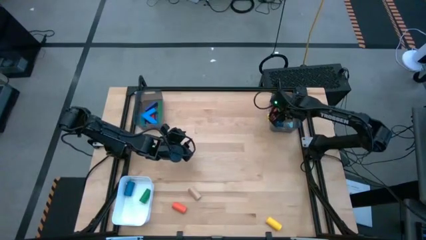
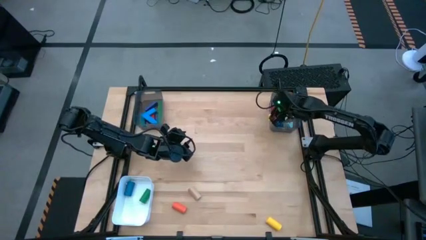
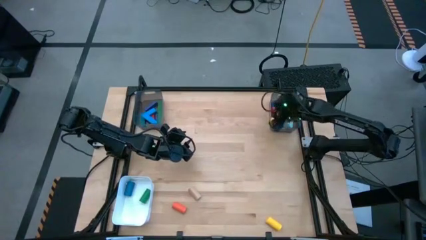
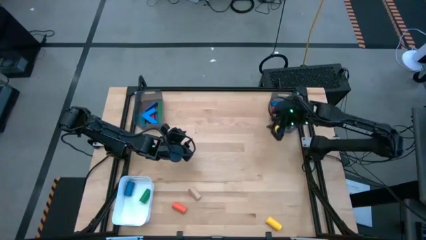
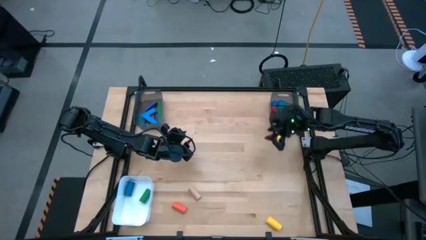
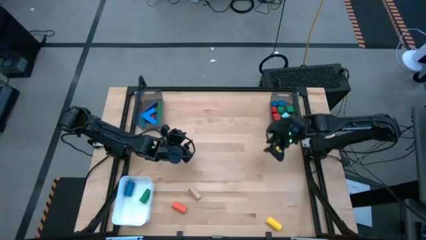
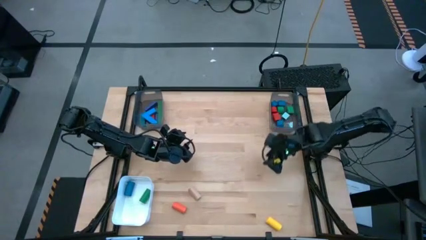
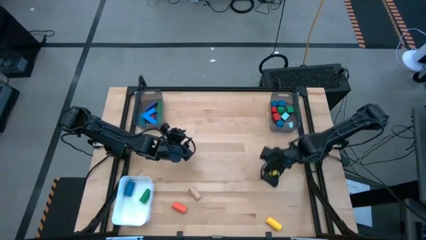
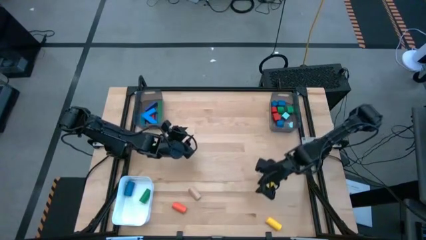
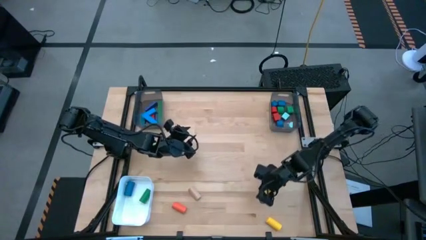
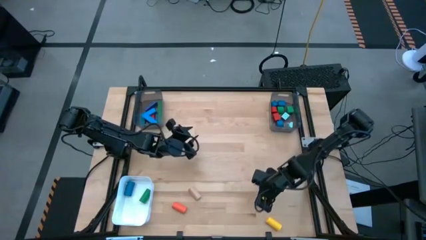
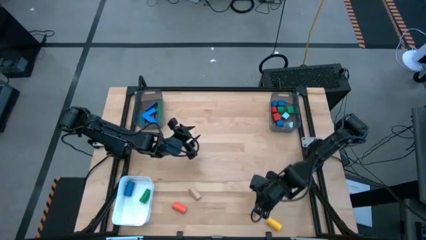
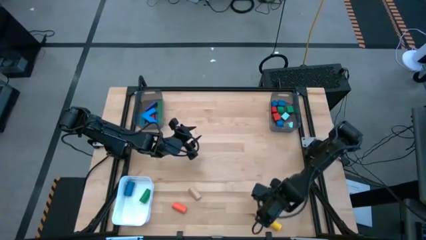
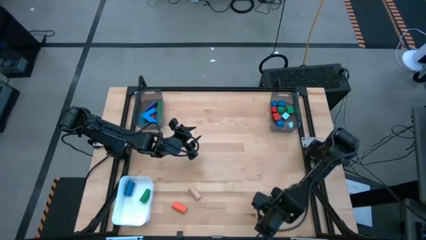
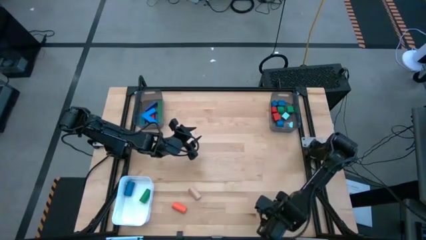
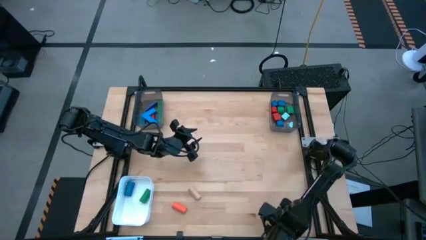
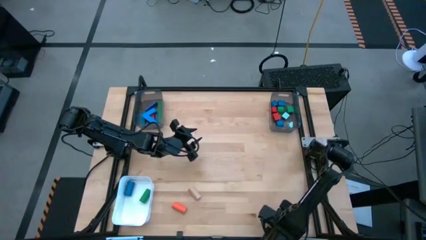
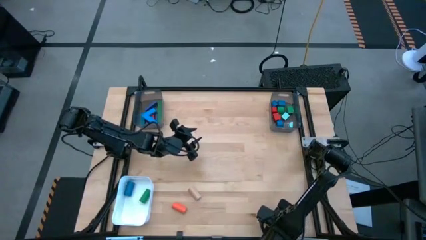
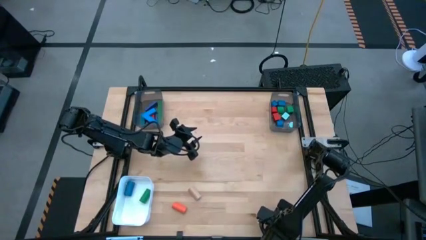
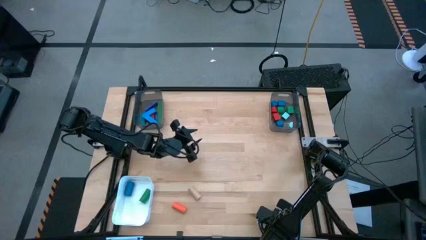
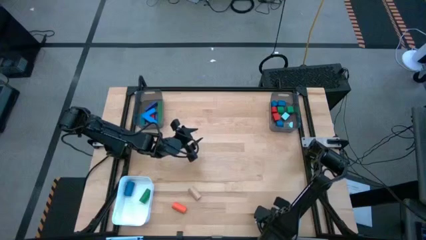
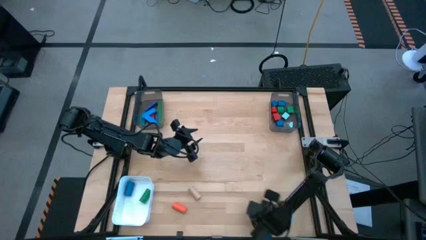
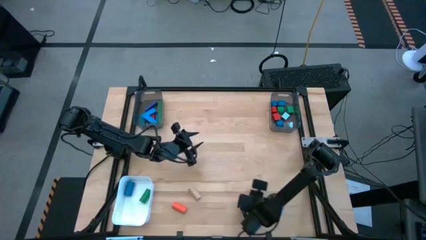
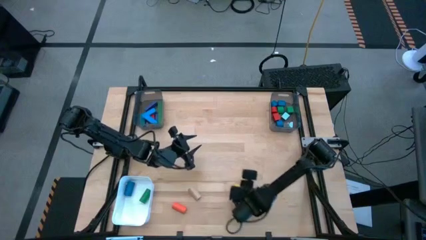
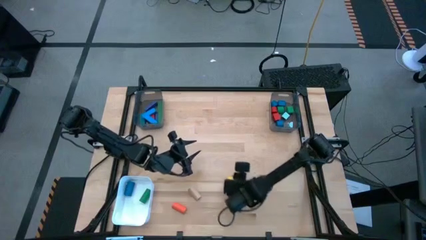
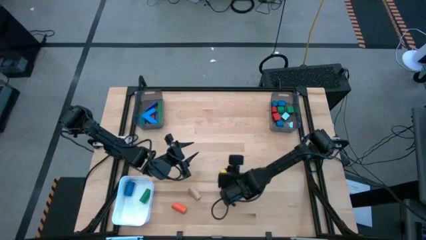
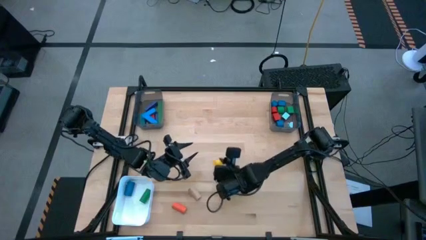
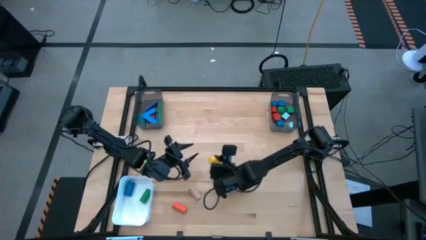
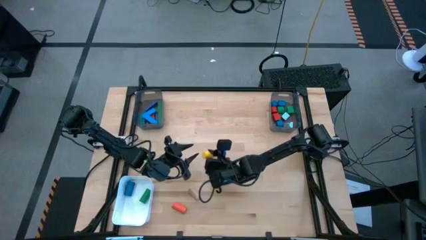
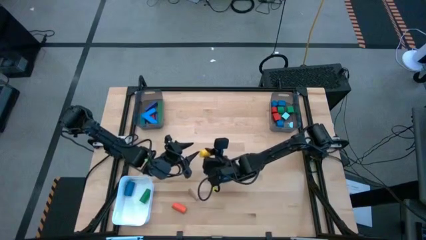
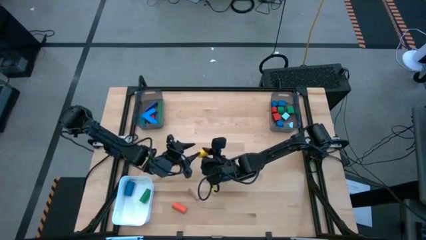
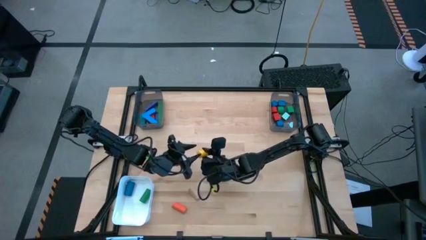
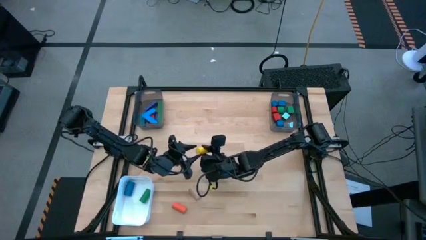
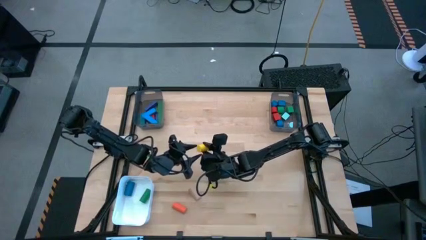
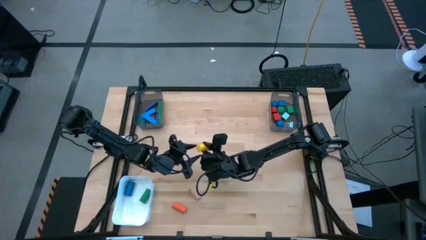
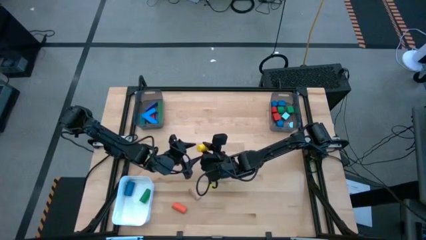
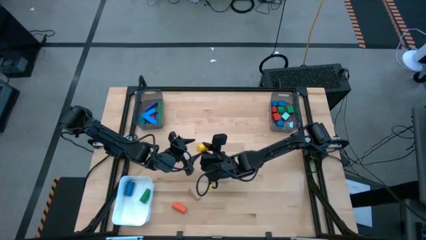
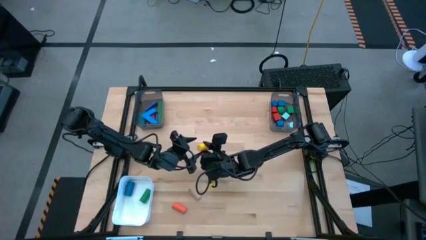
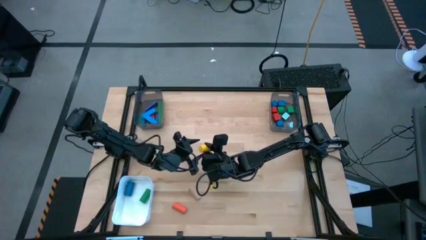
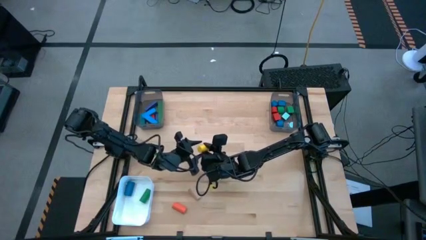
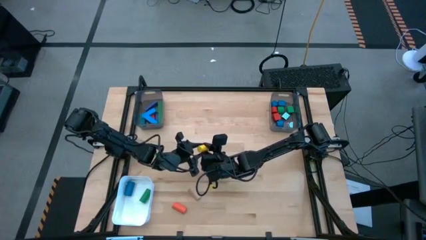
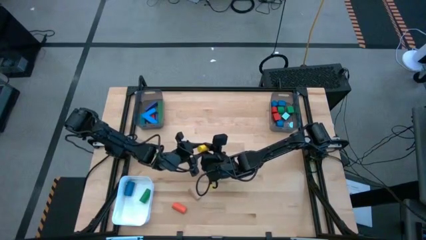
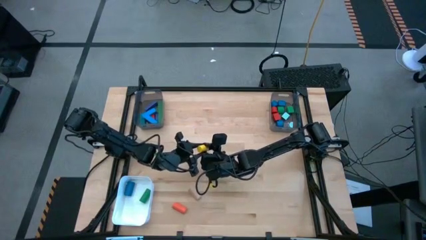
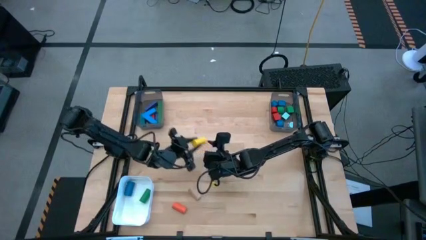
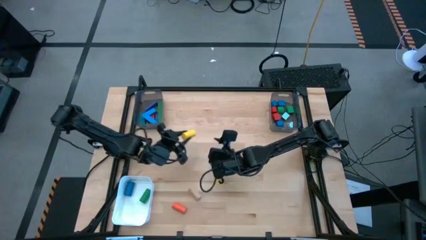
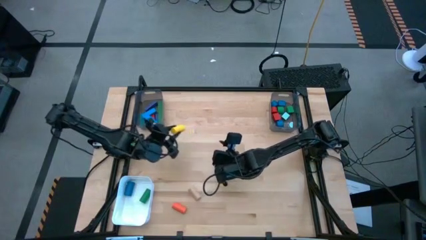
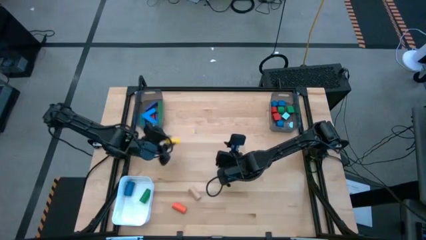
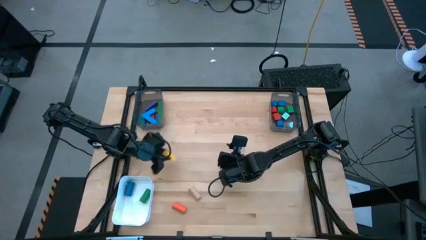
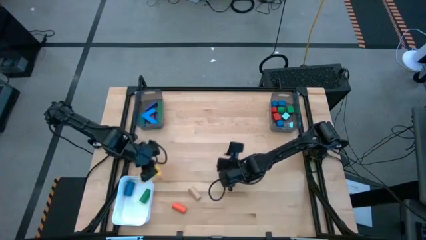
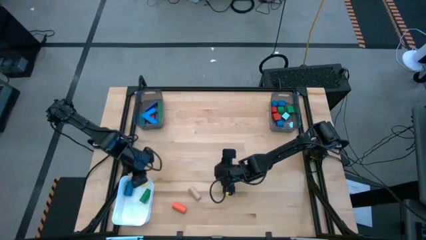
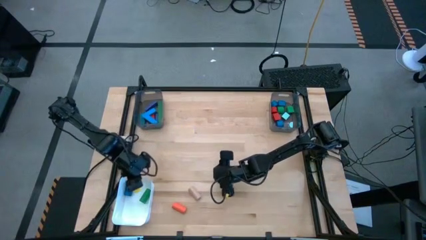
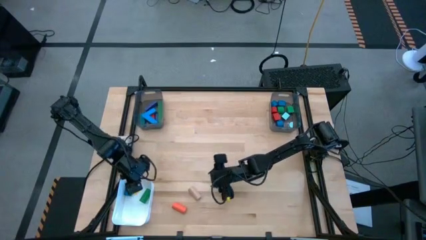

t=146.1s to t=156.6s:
Task: Sort blocks by size
Put the yellow cylindrical block into the white bin

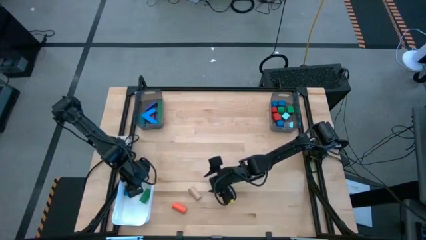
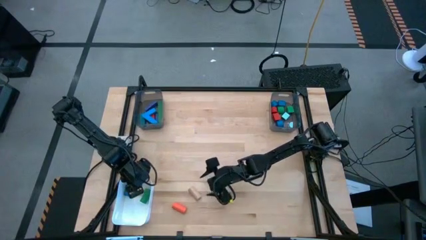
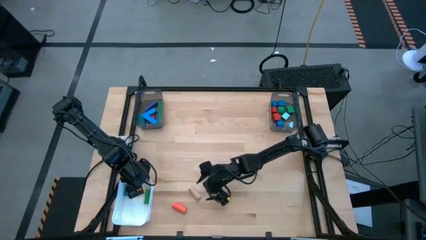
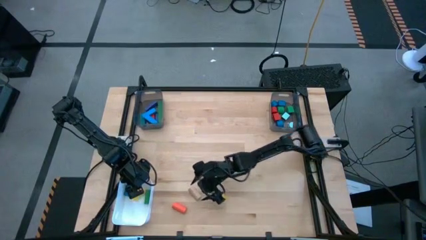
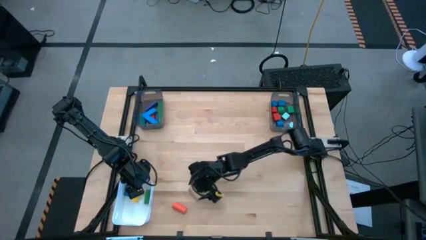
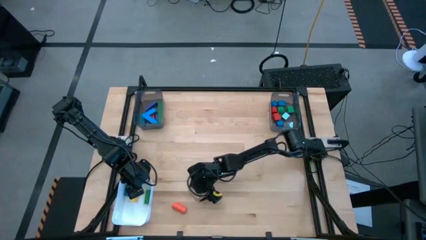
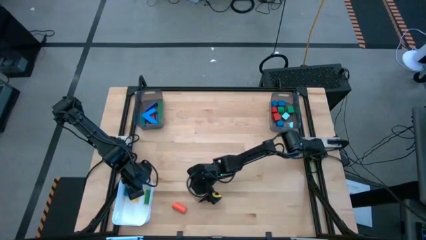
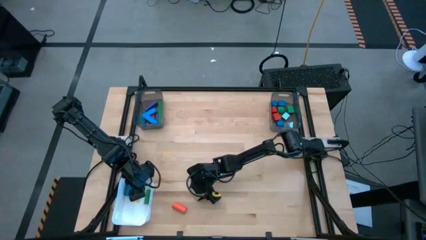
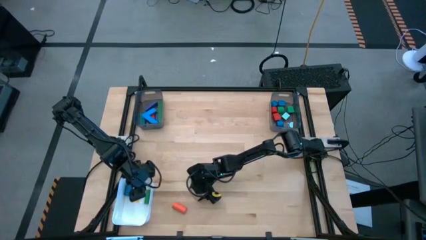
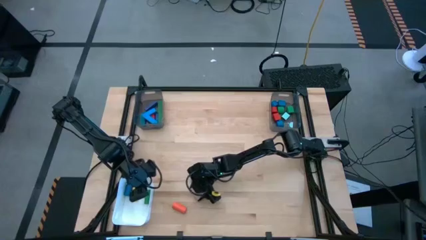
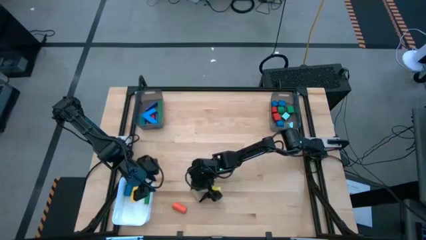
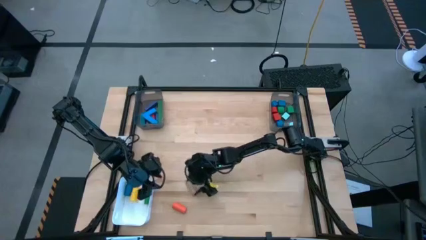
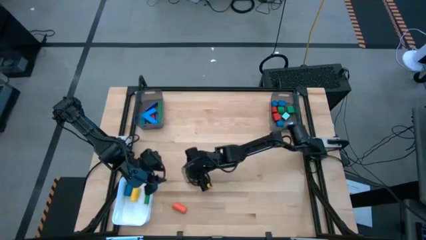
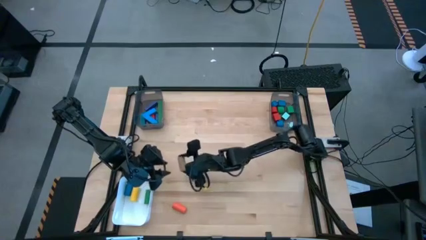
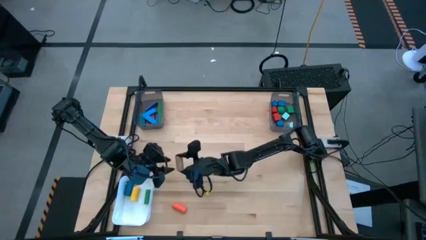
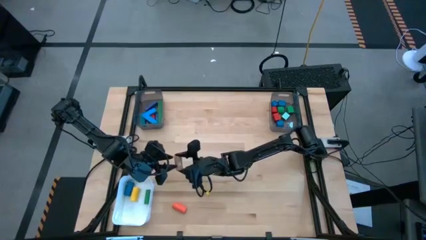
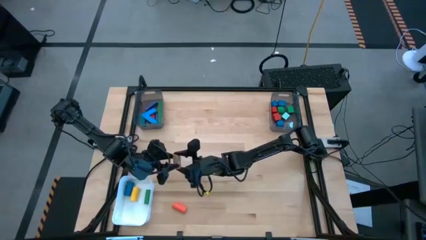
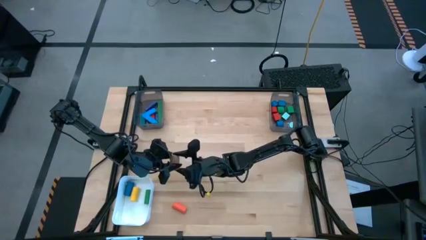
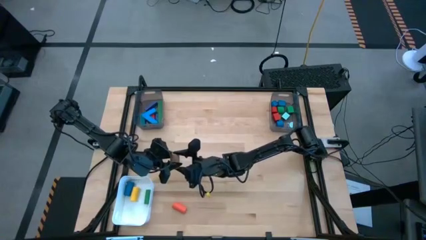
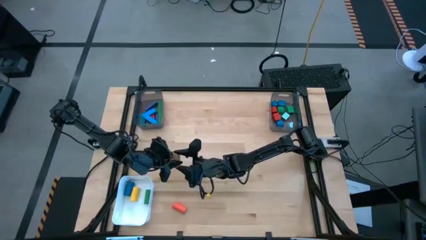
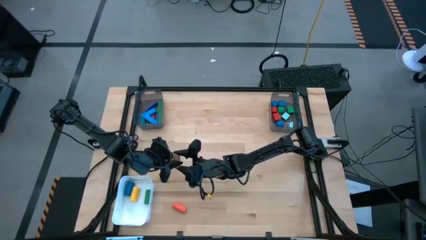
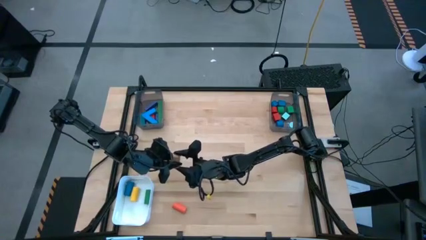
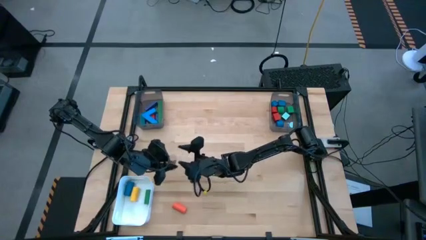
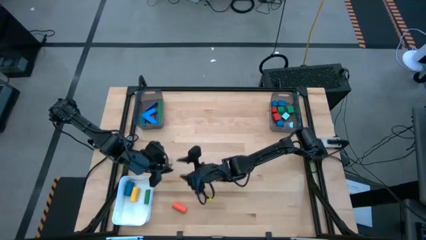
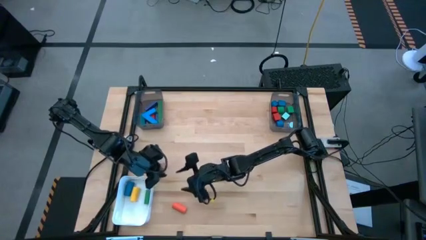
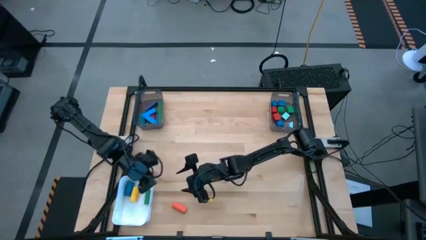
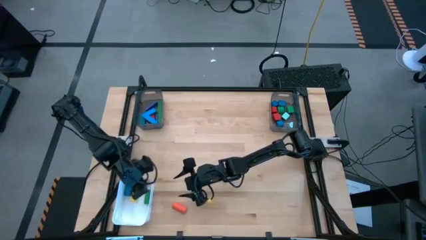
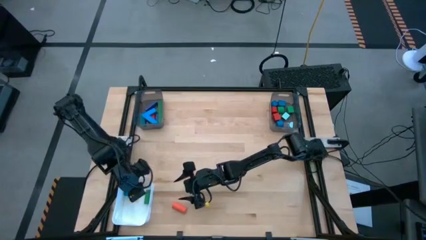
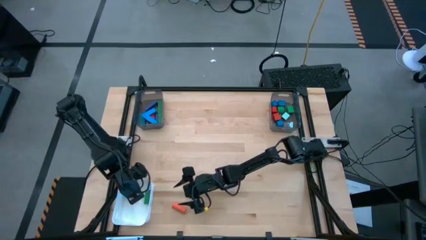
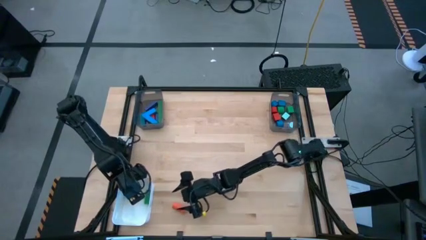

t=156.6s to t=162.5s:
Put the brown cylindrical block into the white bin
